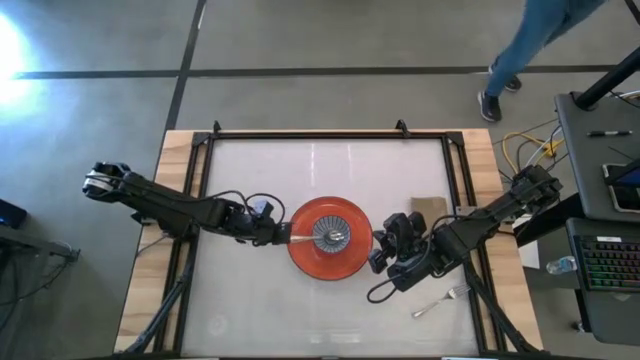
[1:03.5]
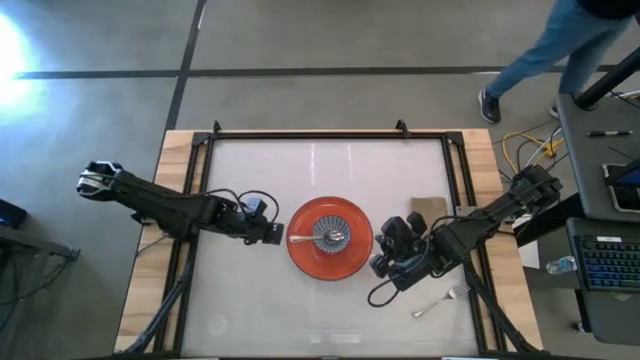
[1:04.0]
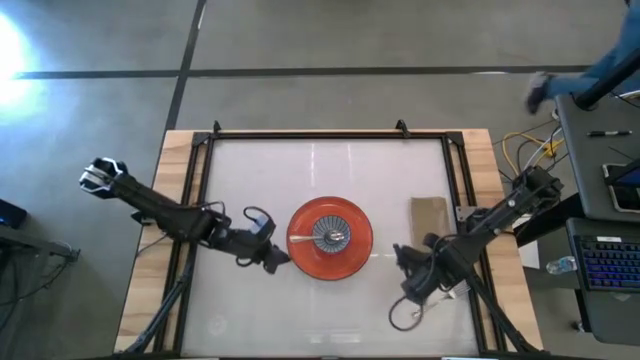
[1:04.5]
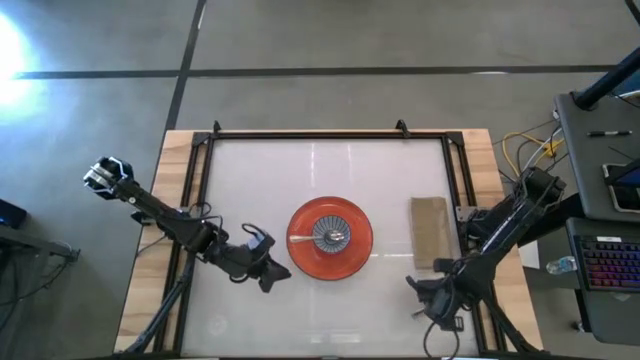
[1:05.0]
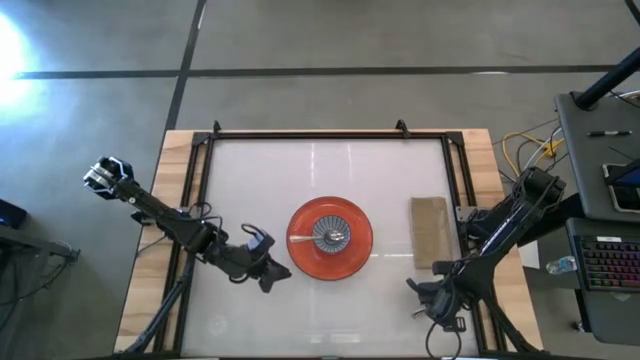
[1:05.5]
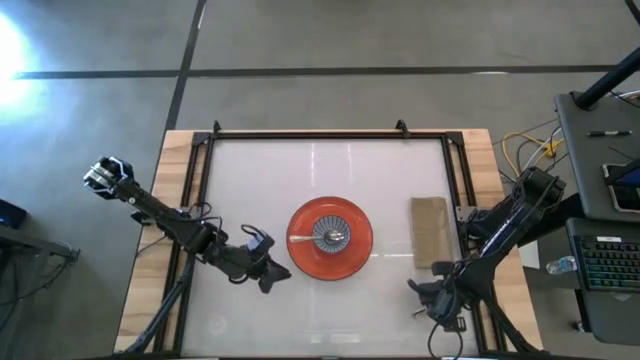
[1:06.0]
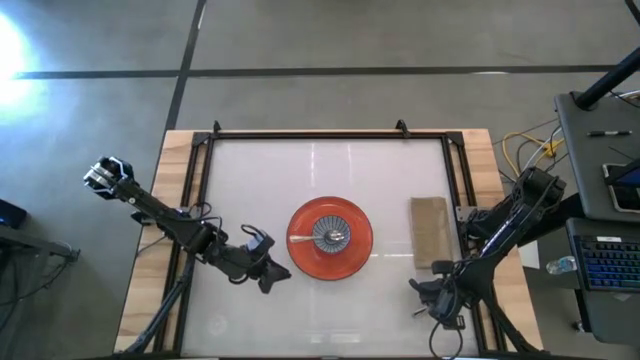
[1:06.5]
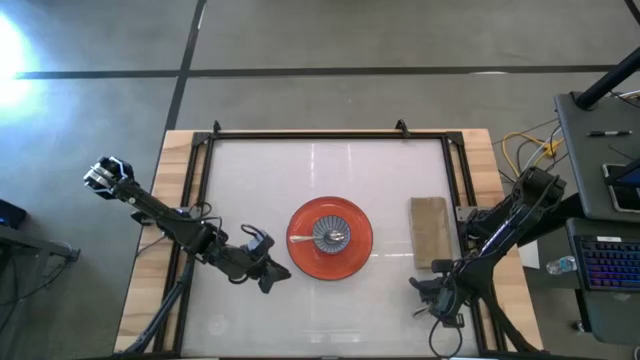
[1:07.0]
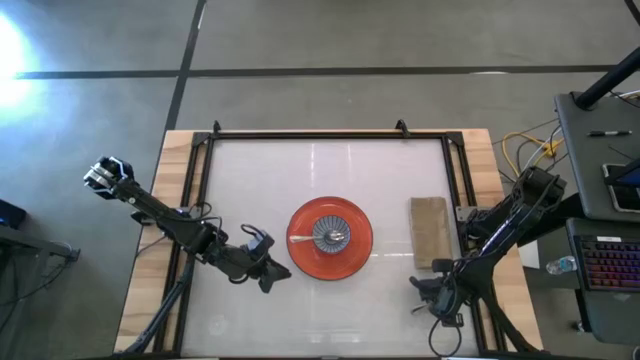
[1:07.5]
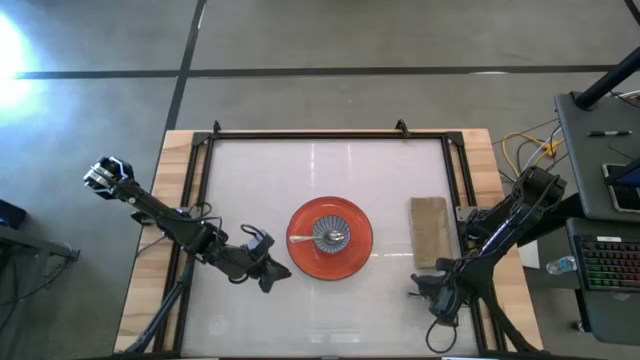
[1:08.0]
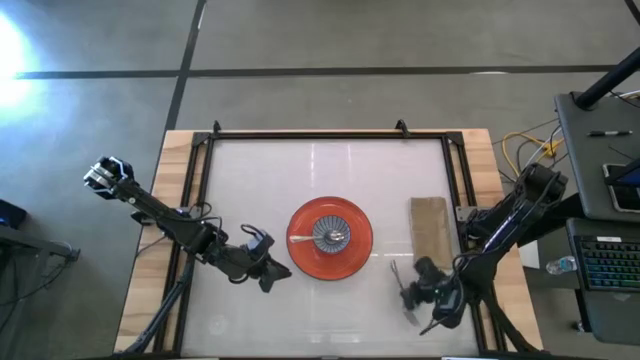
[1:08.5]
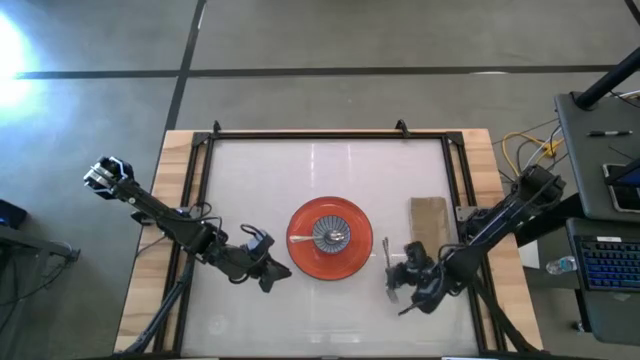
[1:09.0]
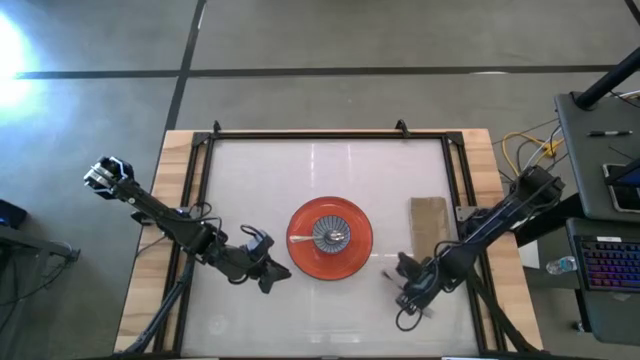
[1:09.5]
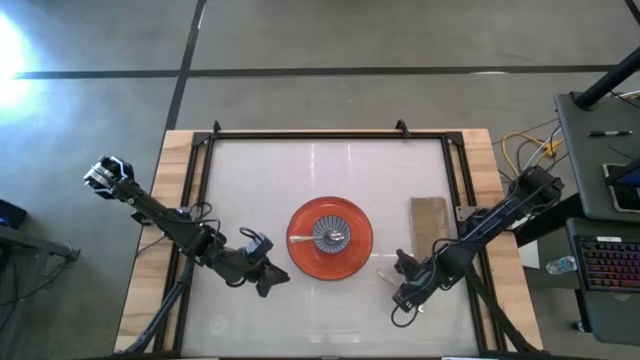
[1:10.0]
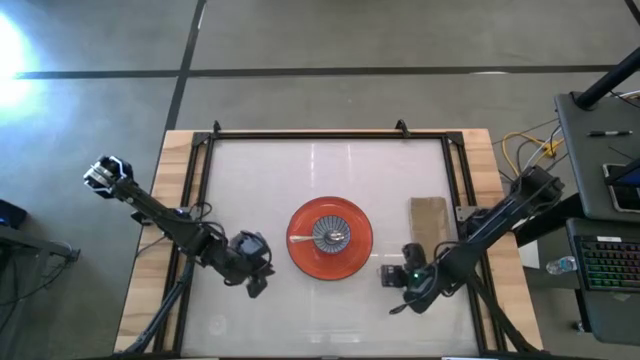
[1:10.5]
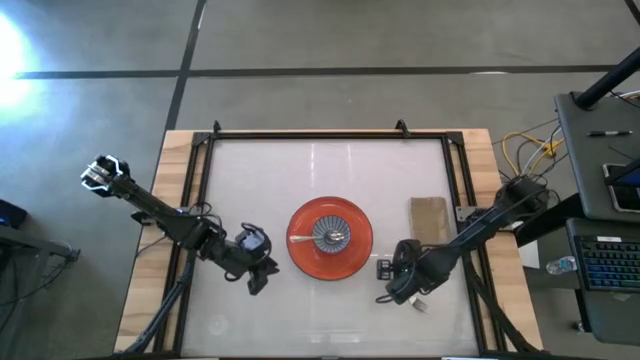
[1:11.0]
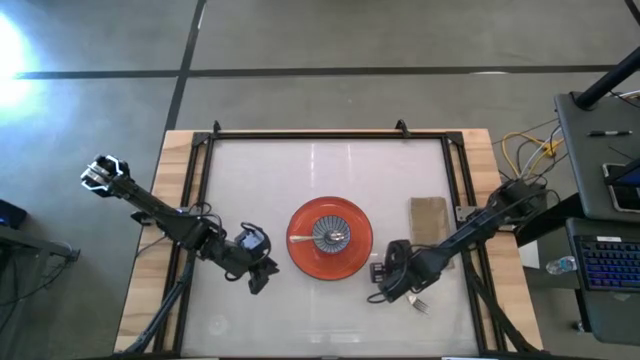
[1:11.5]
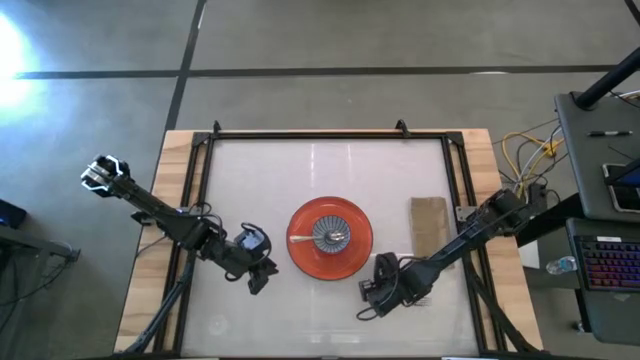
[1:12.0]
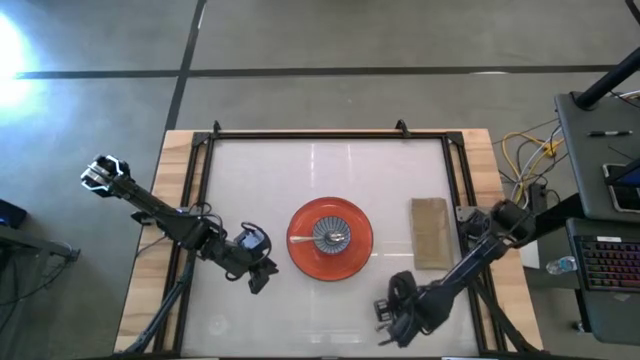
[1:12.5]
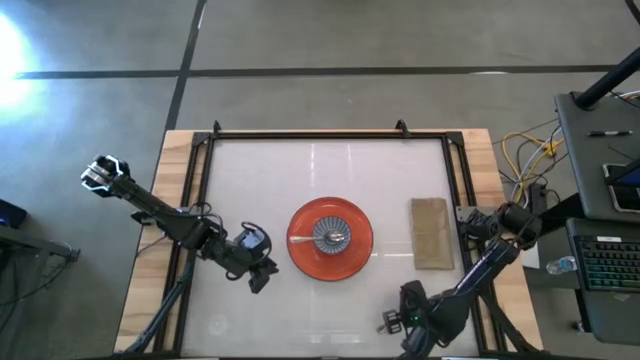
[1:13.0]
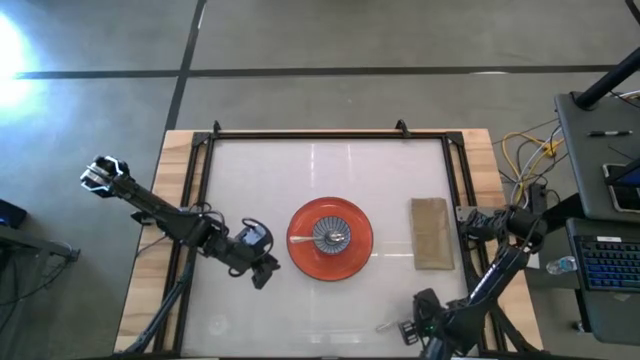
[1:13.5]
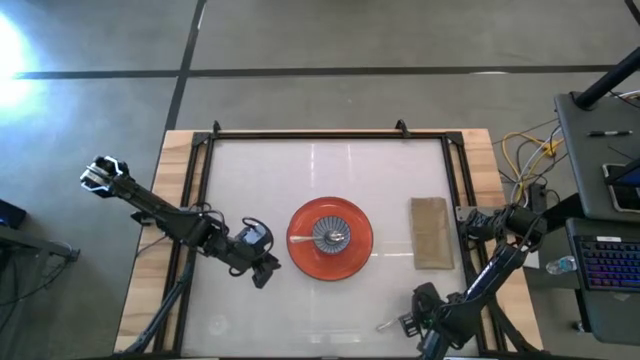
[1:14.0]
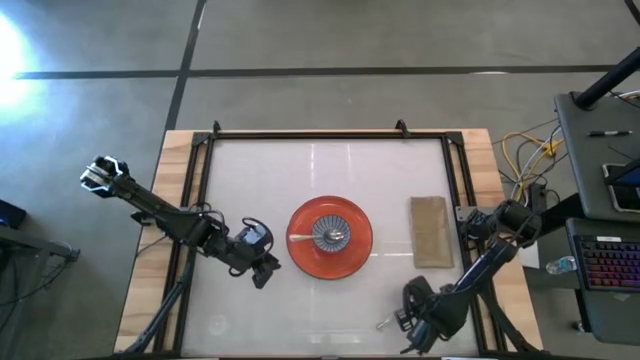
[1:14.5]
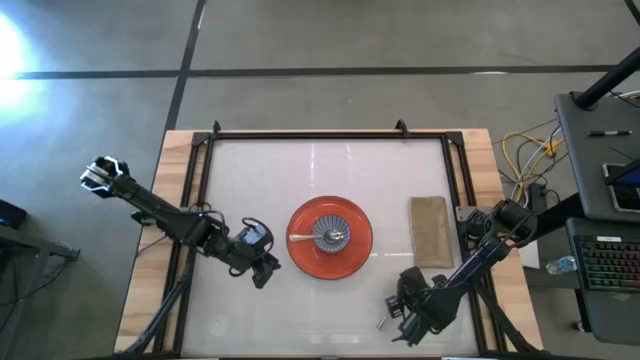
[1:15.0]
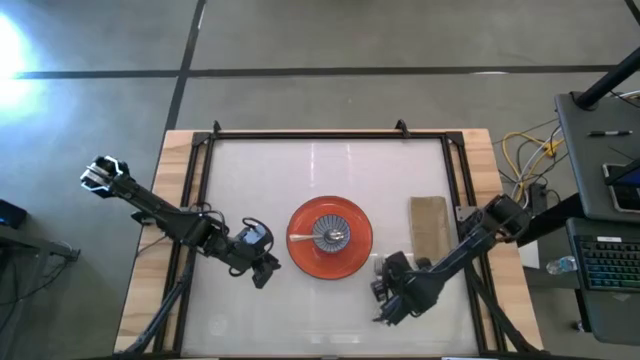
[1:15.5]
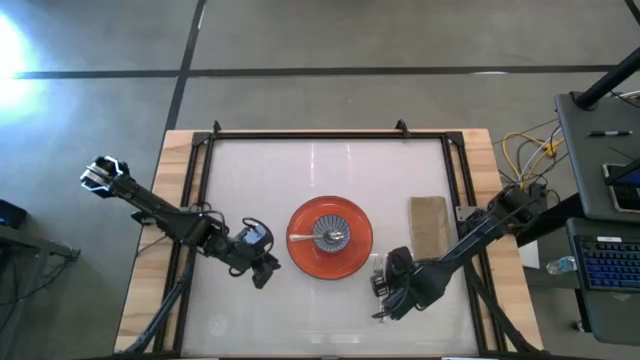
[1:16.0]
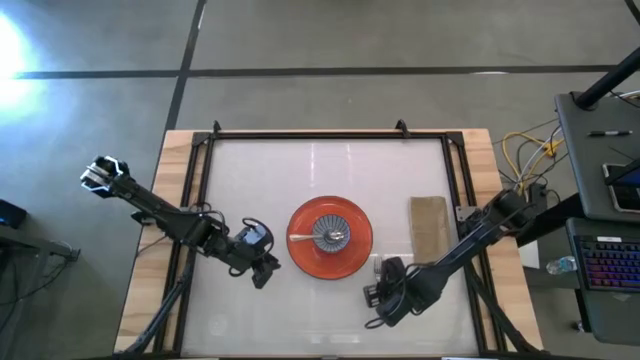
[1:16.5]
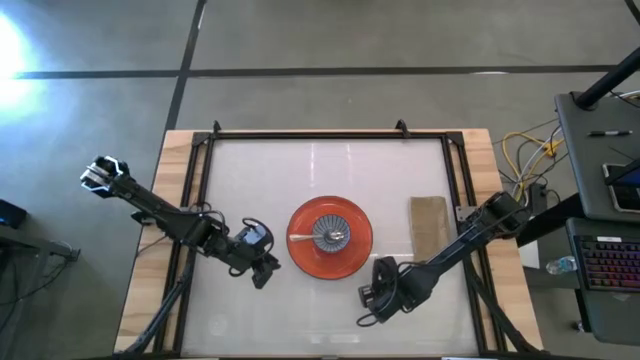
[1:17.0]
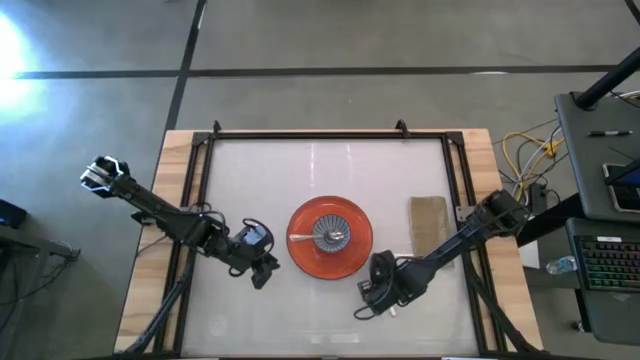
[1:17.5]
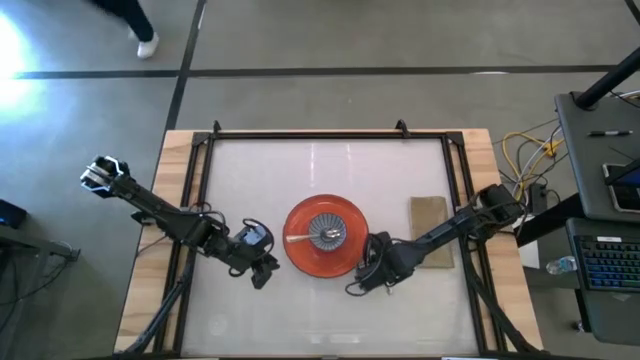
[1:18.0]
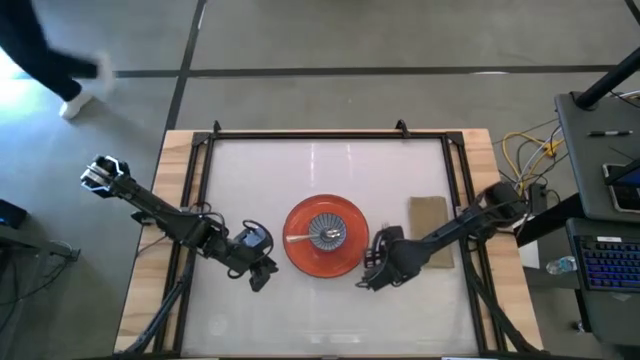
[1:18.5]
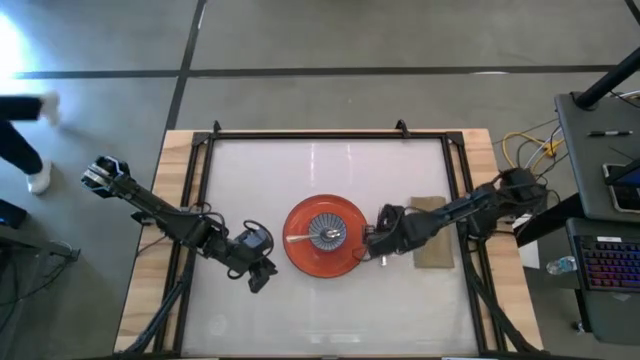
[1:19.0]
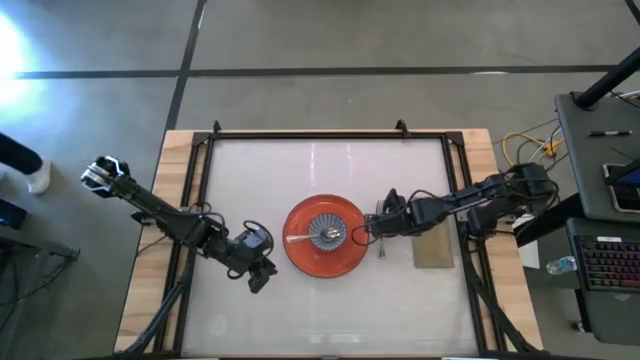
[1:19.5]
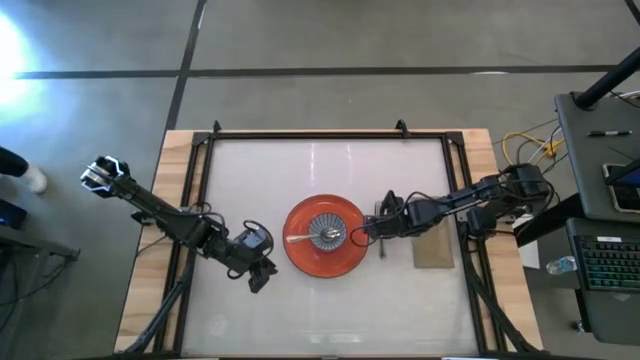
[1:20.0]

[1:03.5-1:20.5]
Task: Set table place
Move the fork beside the plate

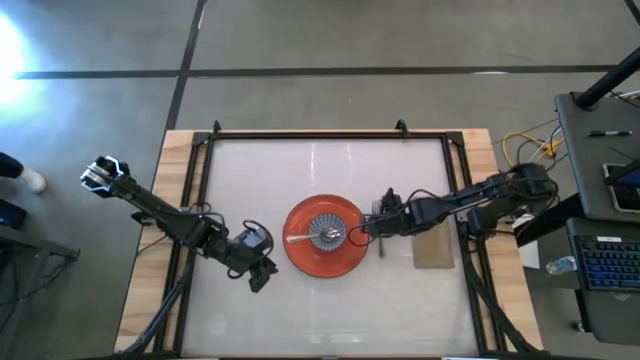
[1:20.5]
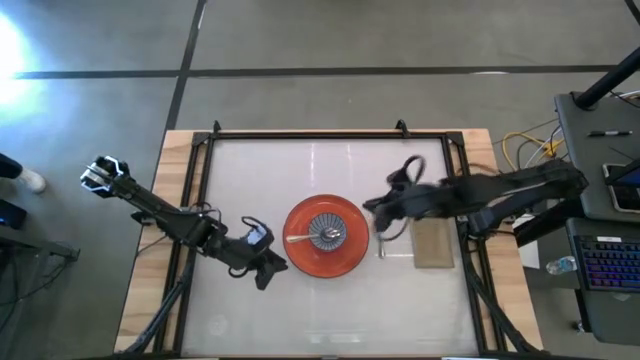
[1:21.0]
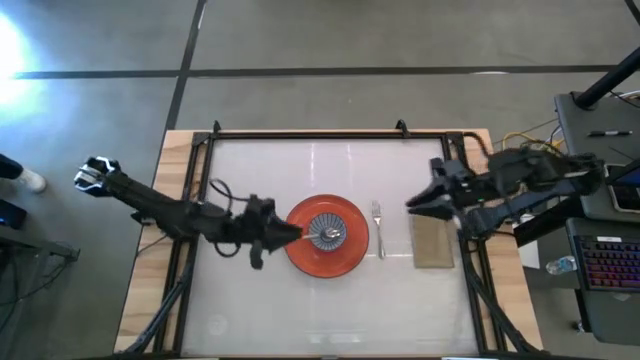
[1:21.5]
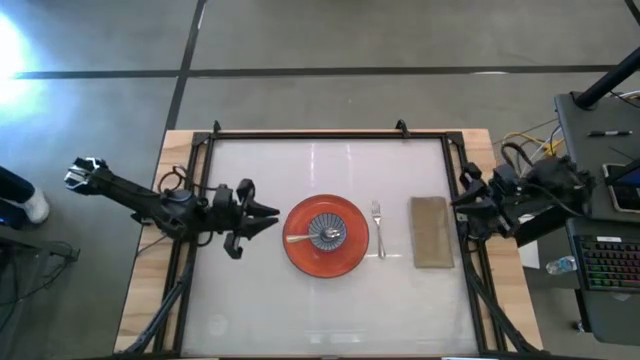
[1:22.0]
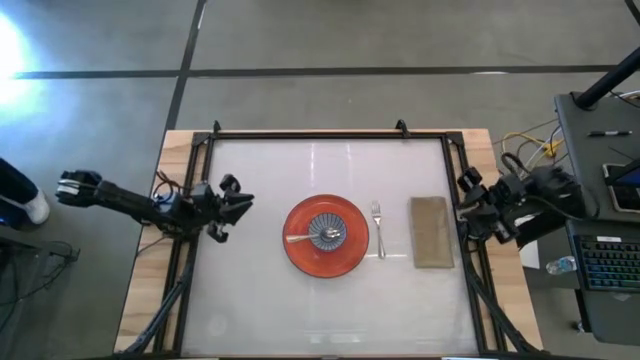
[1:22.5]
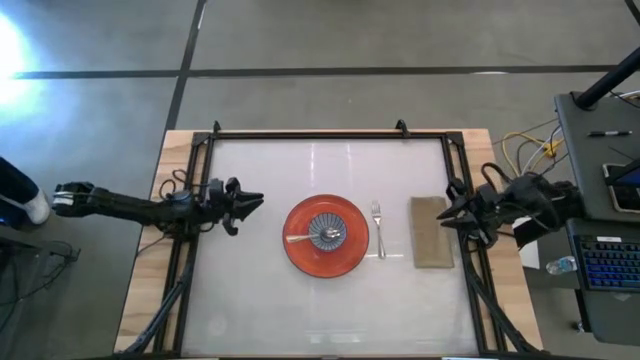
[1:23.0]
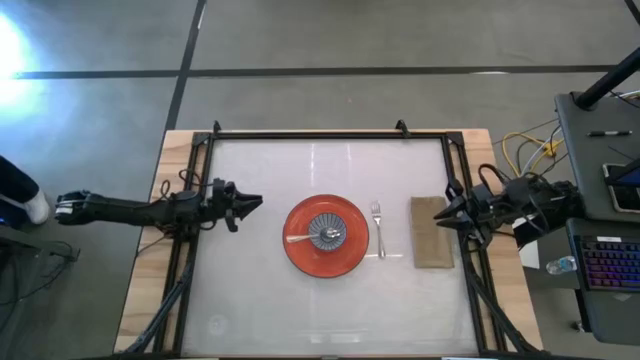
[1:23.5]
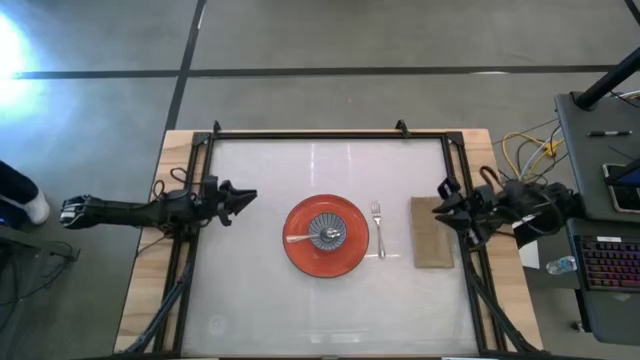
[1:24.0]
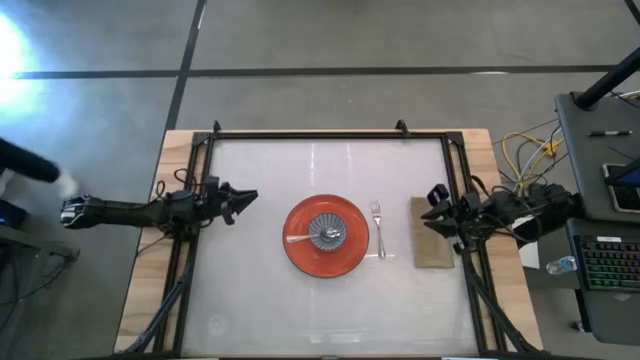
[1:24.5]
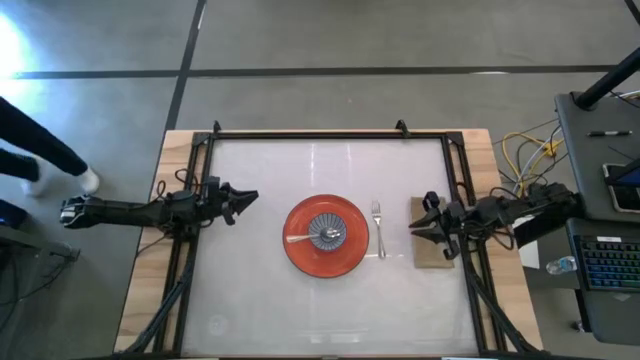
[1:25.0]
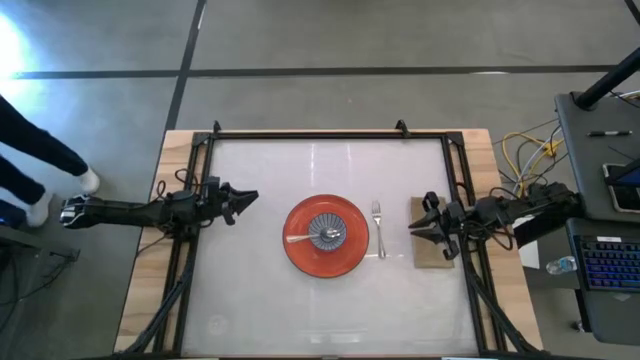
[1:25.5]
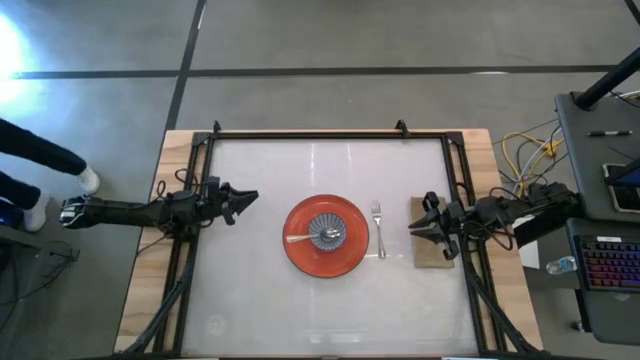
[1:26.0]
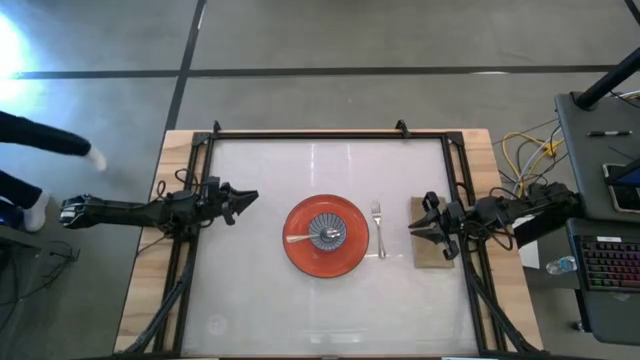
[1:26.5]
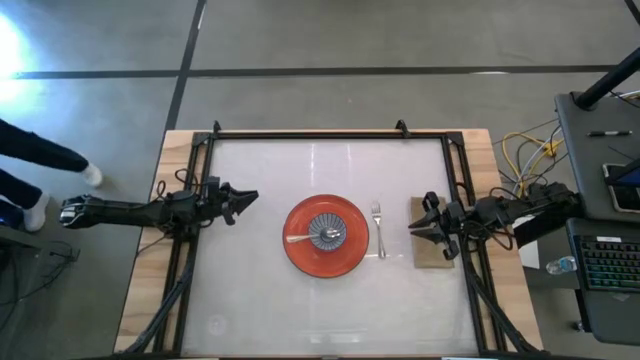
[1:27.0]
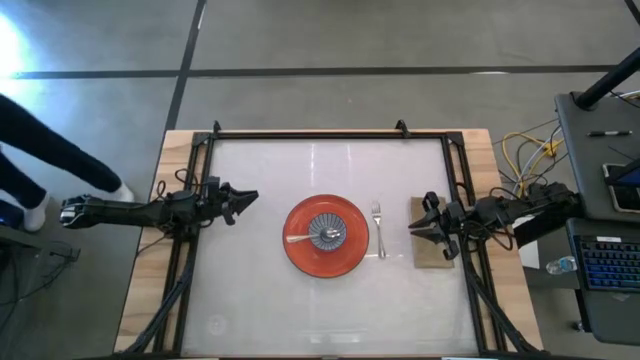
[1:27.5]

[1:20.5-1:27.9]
Return to Home Position
